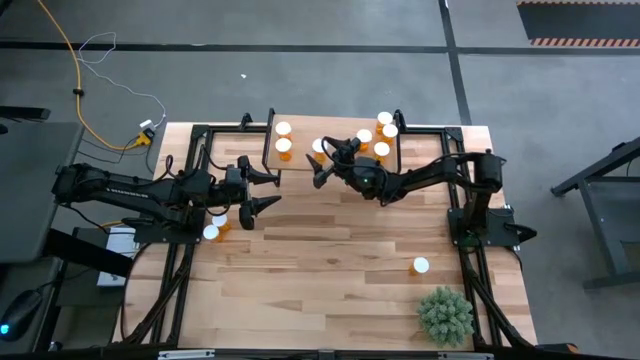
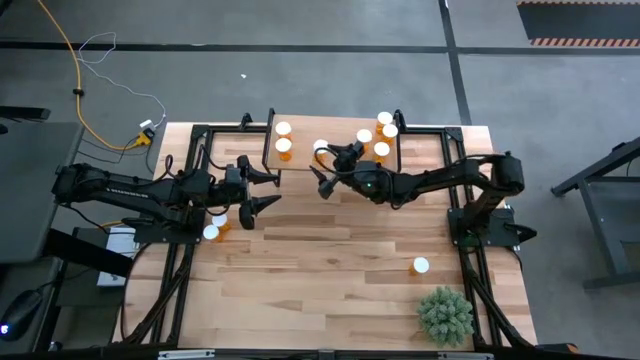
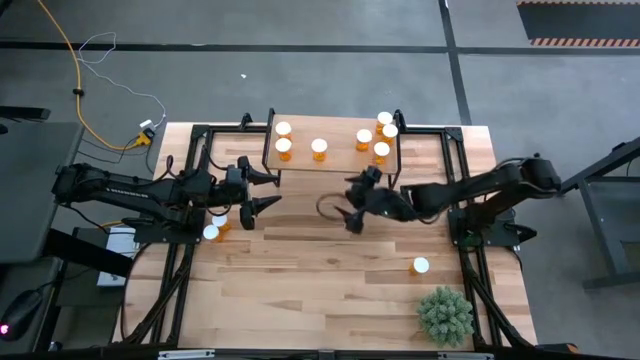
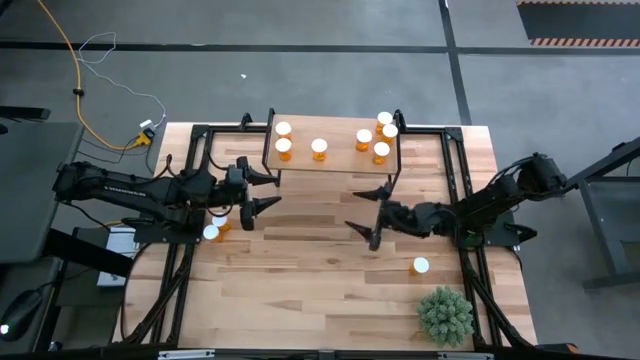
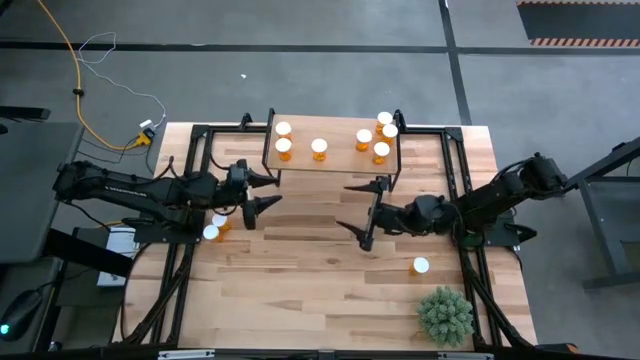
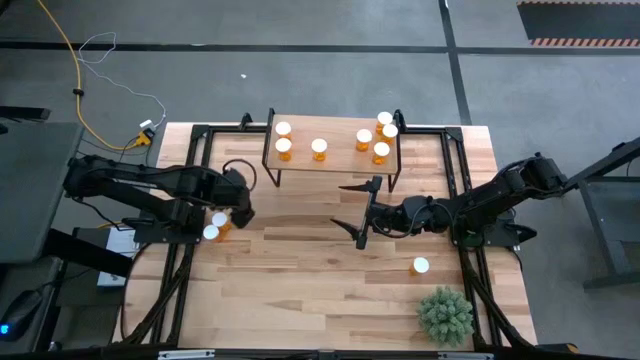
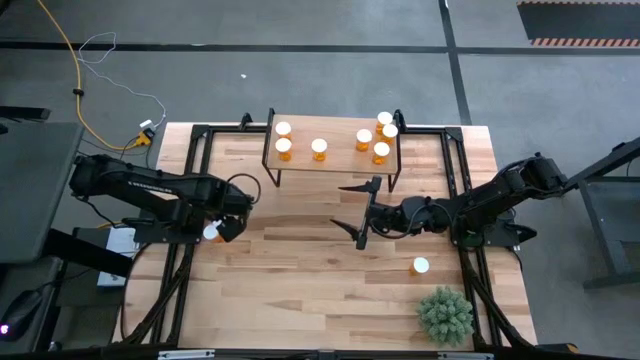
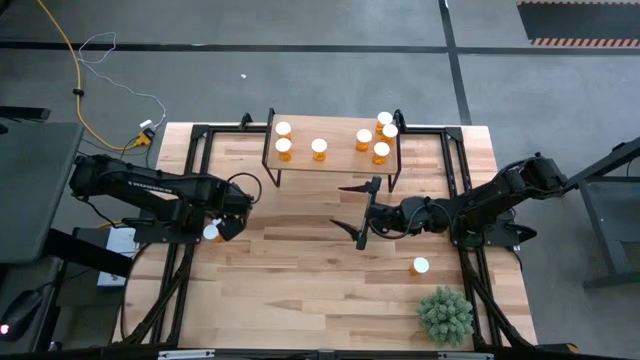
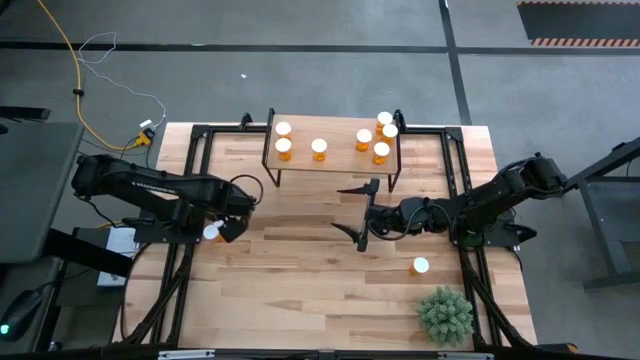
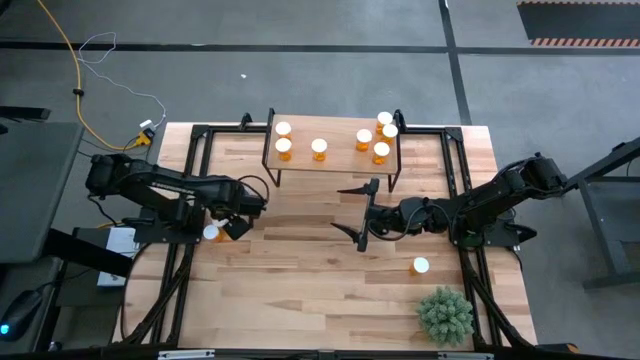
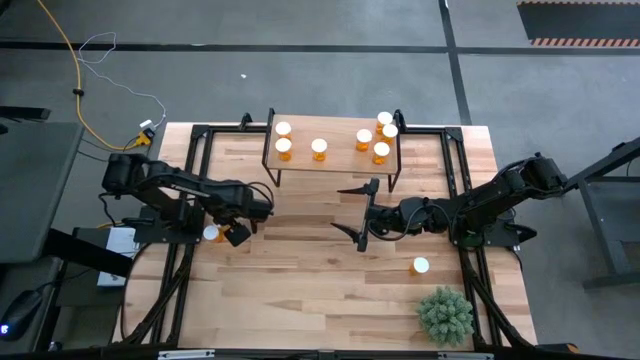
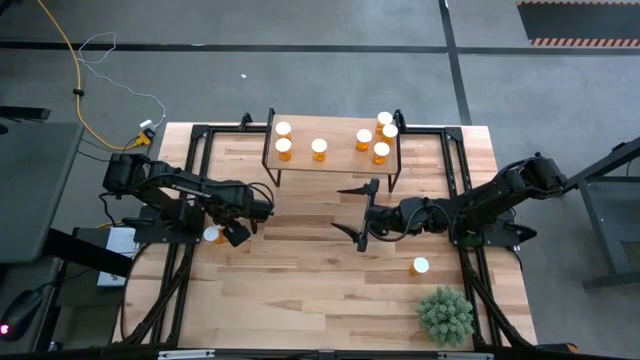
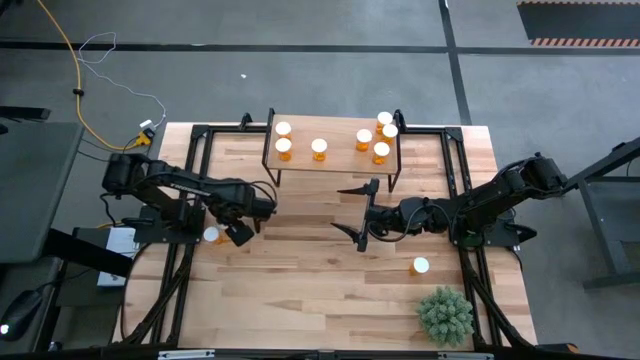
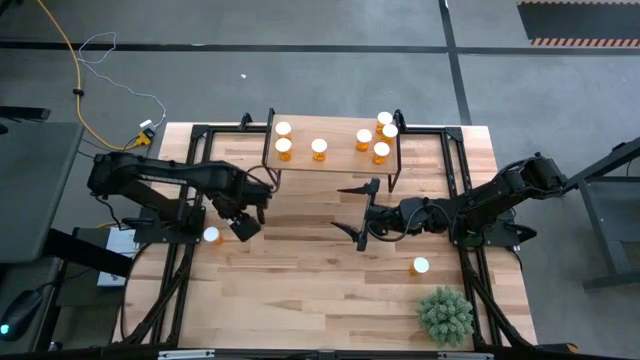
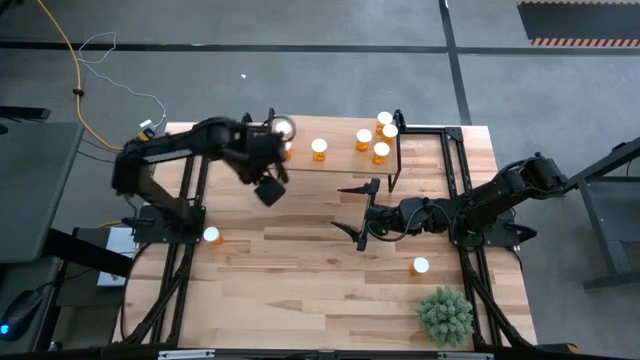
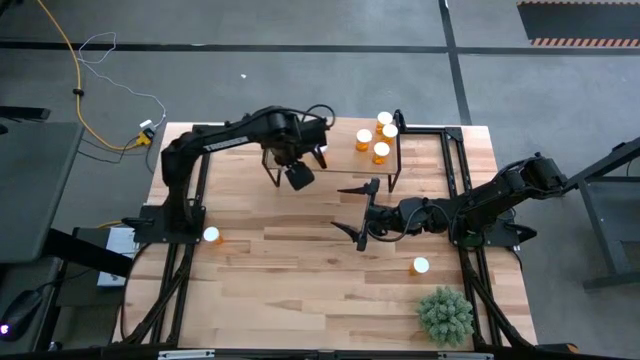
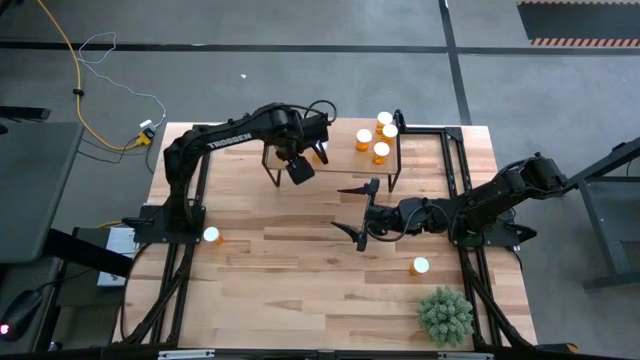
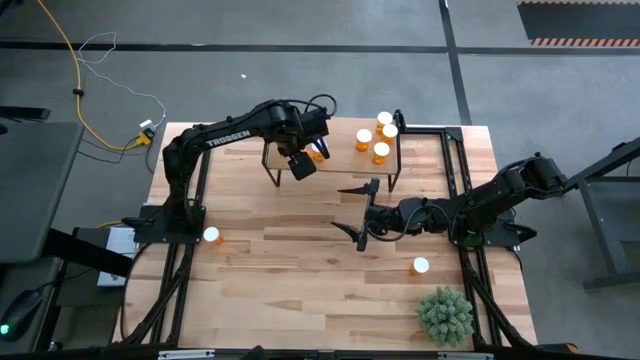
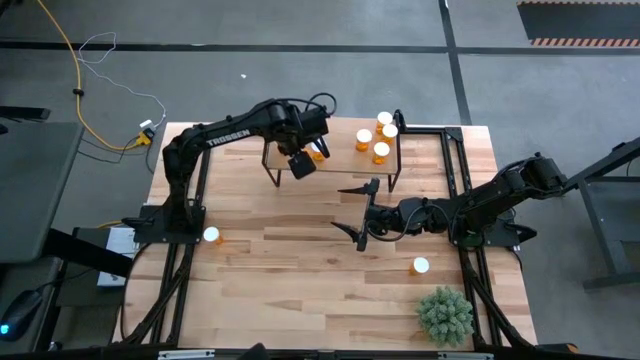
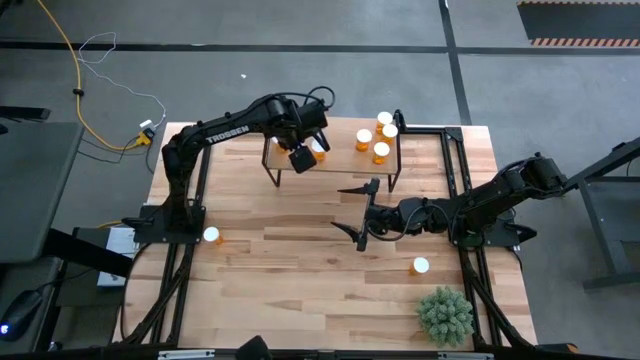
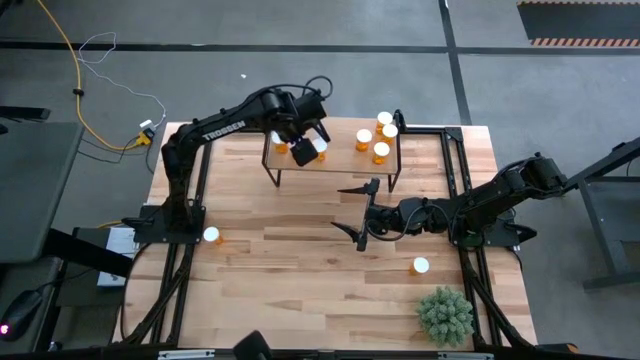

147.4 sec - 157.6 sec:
Task: Pick and place medicine bottles onto shelf by color
Put the yellow pill bottle on the shelf

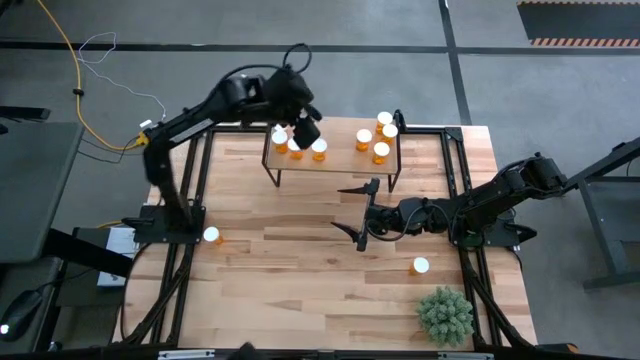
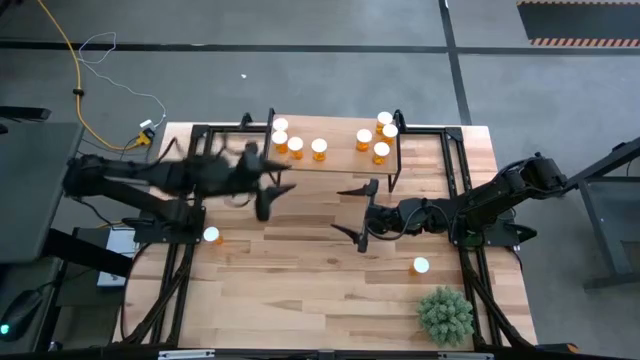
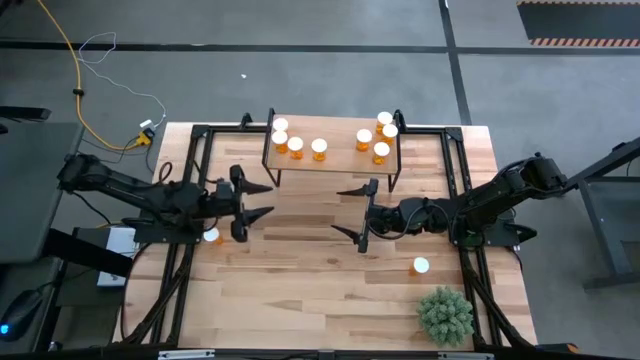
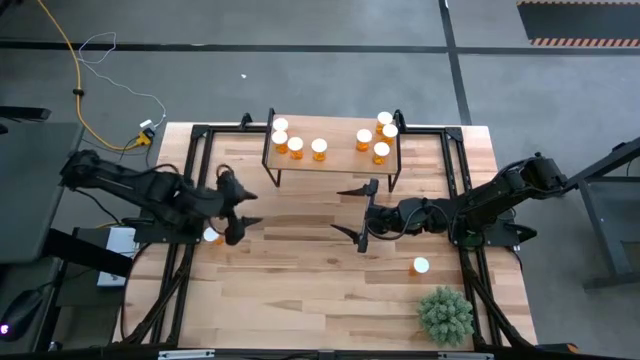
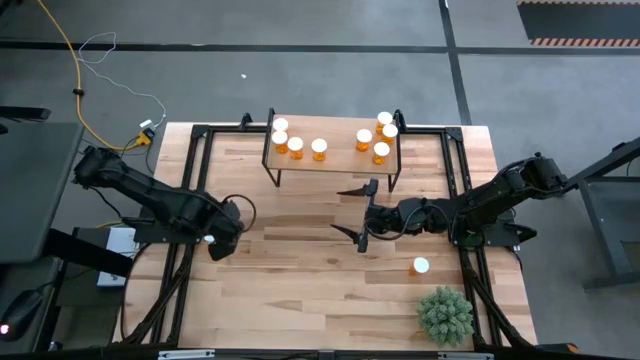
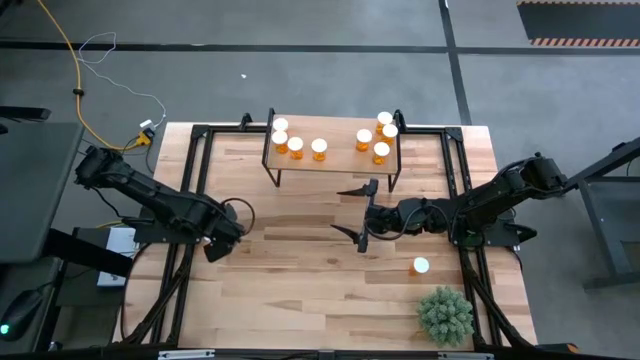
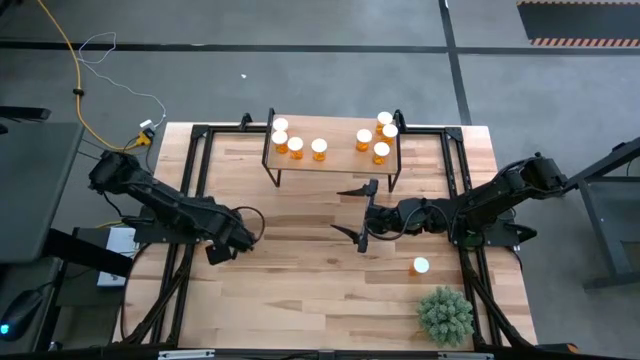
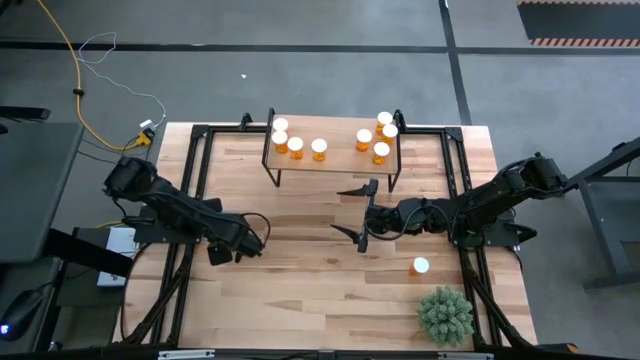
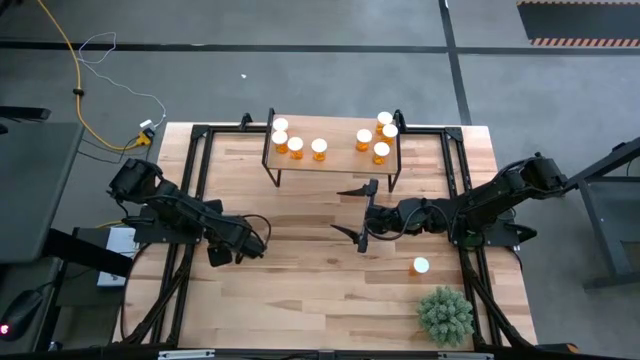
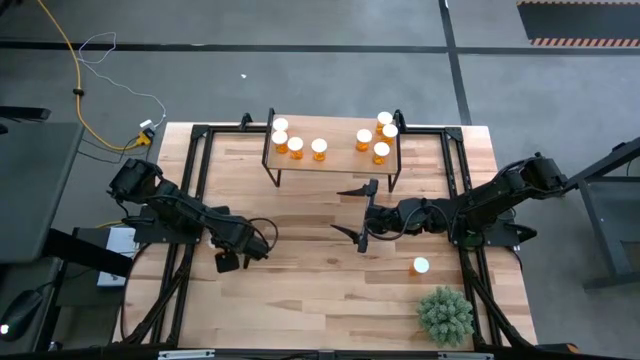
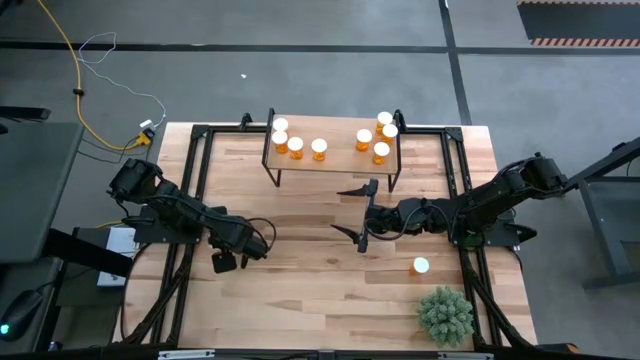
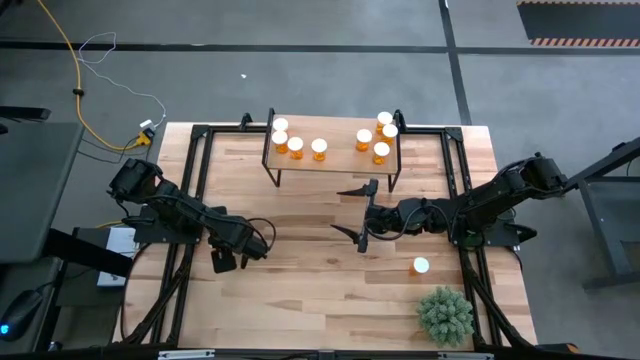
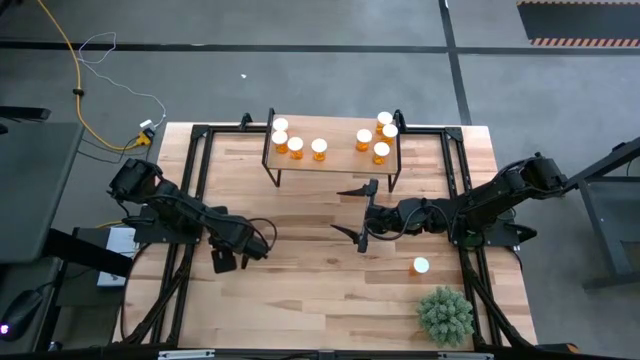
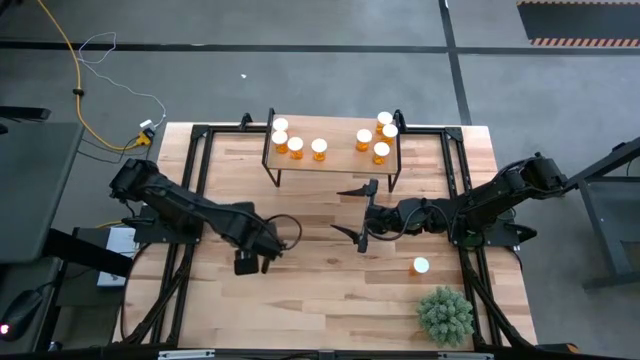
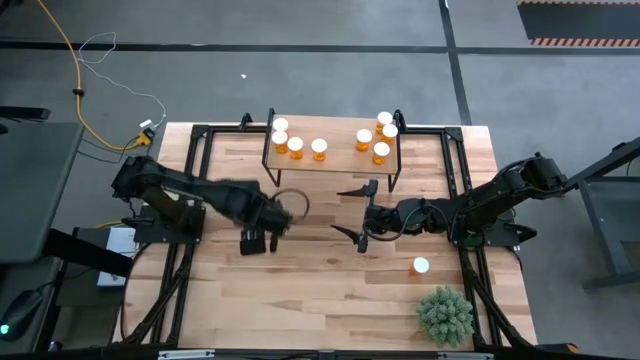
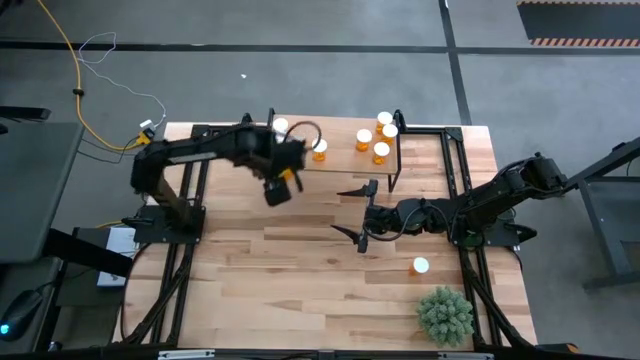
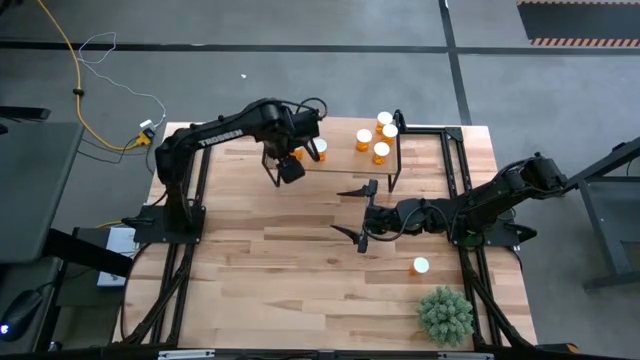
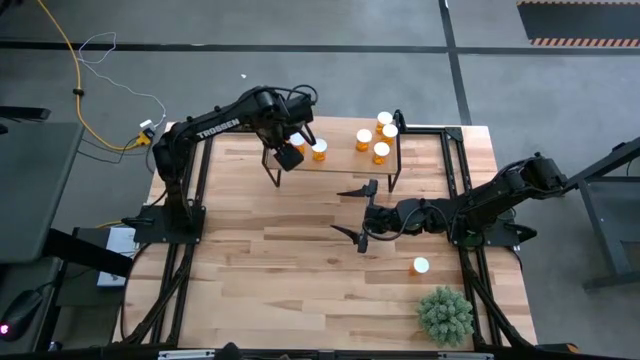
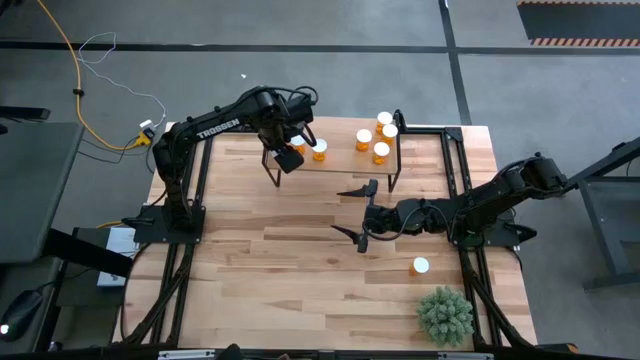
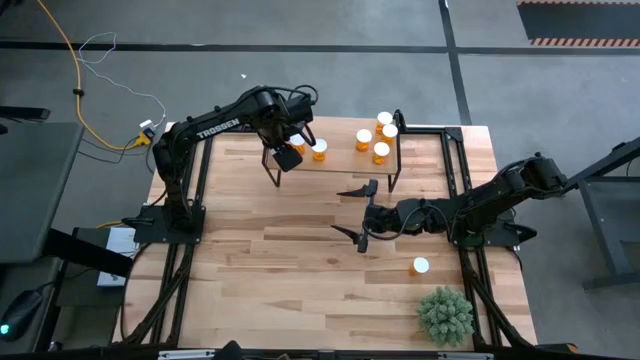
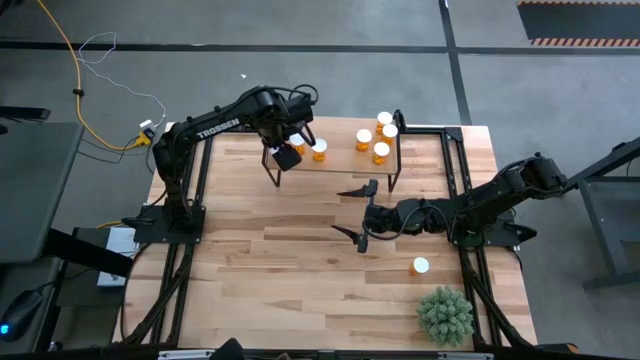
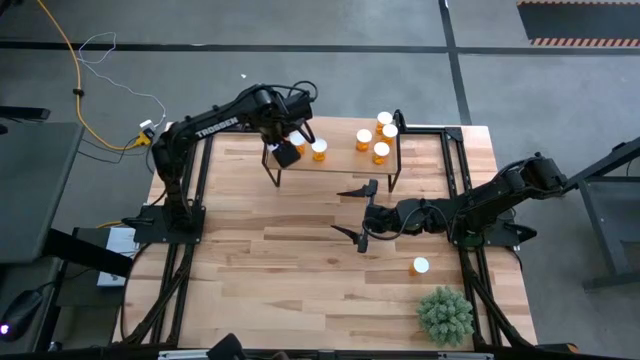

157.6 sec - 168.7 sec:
Put the yellow pill bottle on the shelf
